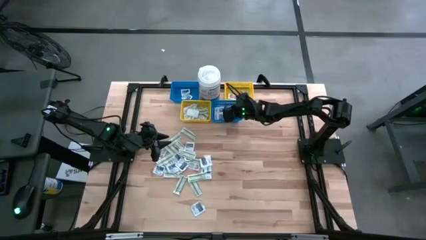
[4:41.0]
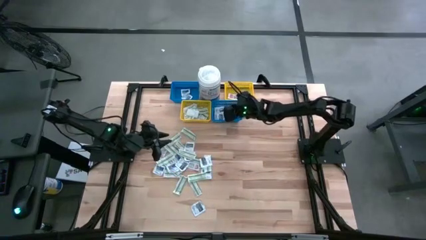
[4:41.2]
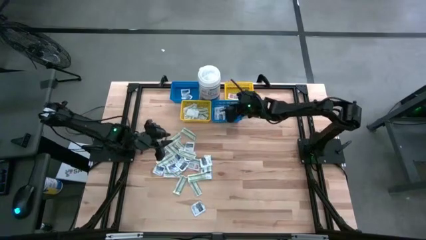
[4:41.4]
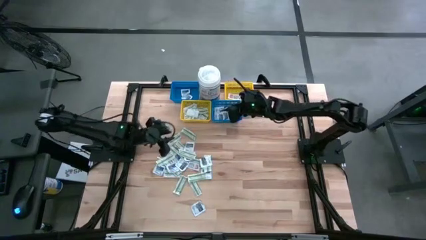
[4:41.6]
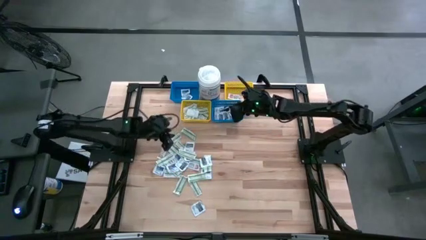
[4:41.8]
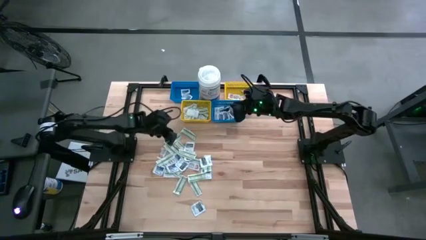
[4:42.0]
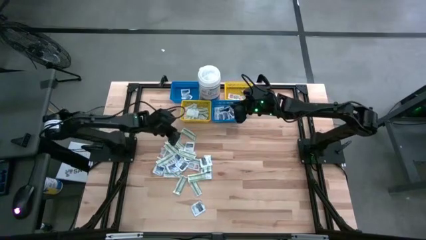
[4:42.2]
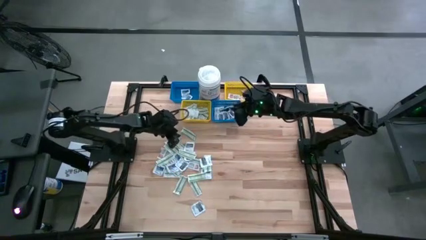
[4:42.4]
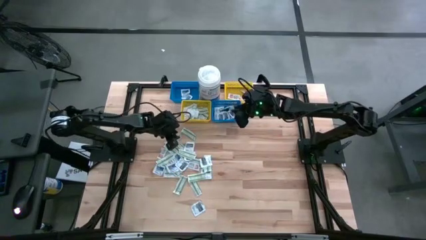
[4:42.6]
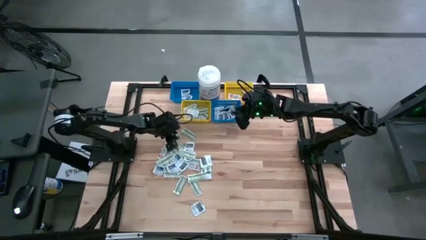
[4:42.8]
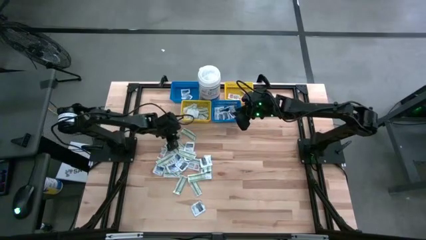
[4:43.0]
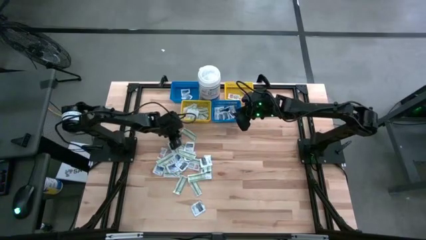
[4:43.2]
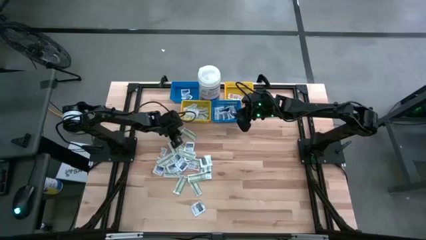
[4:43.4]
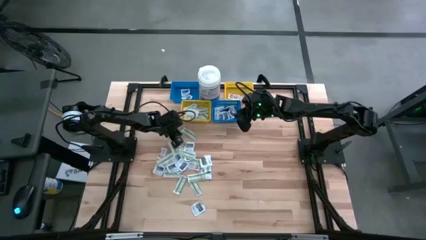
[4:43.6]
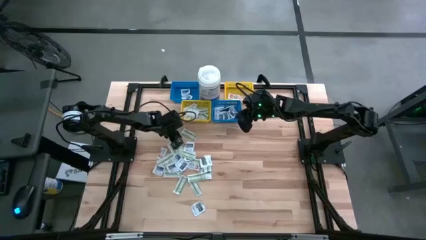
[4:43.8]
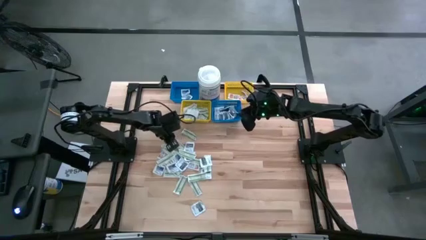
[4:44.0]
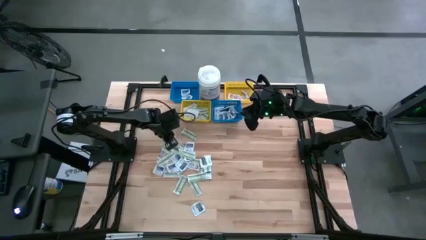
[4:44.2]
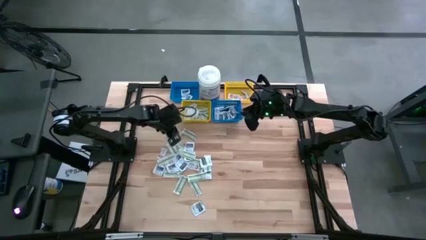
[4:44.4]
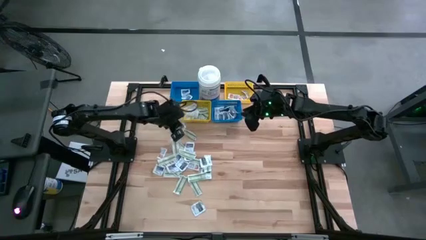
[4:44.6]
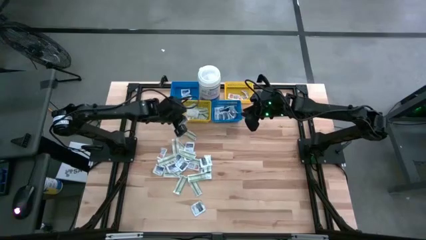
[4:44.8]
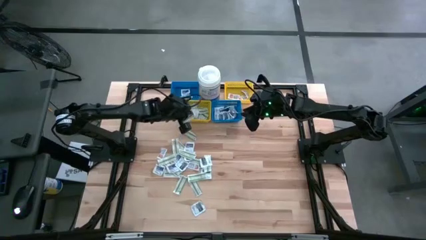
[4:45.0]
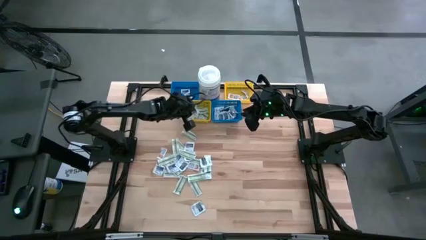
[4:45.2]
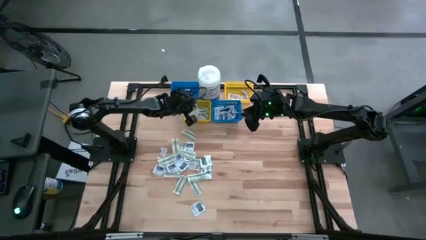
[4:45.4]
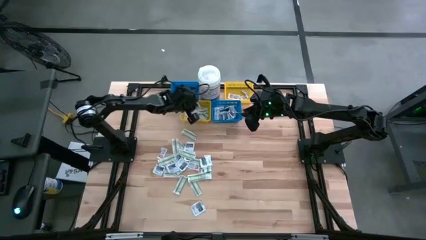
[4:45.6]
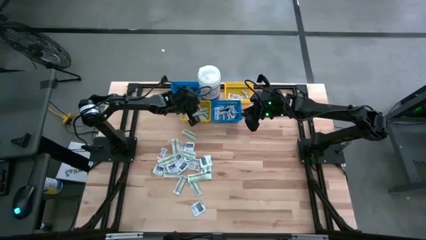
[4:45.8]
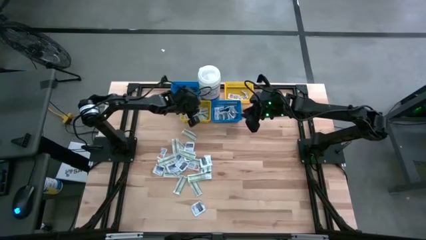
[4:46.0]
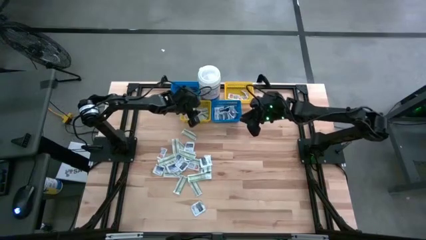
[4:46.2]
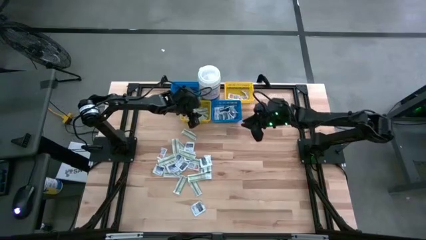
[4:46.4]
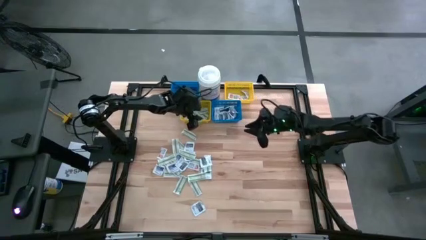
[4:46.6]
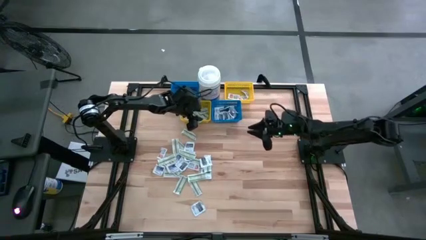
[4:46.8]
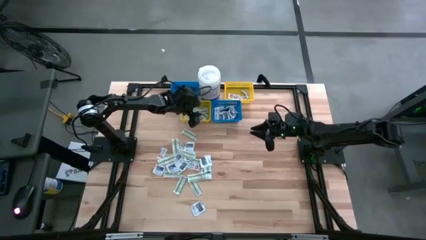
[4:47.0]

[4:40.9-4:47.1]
Task: Pick & Place First Aid Supplies
Put the green bandage pad into the left yellow bin

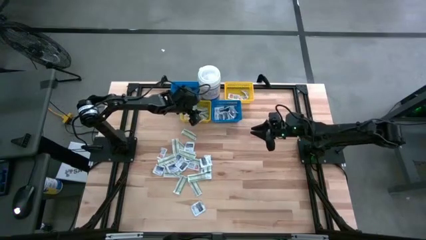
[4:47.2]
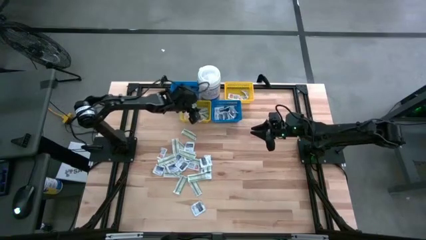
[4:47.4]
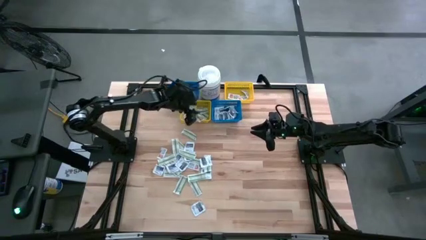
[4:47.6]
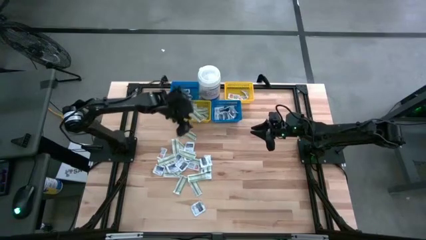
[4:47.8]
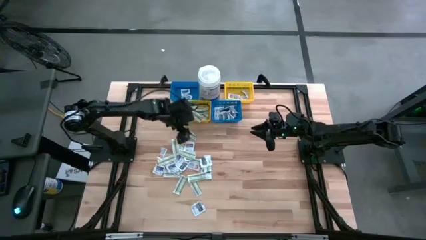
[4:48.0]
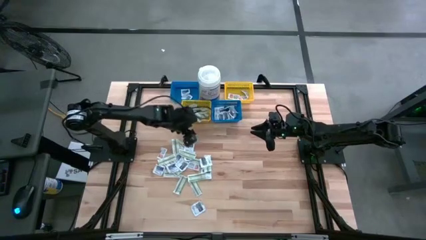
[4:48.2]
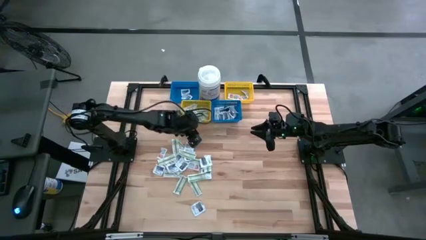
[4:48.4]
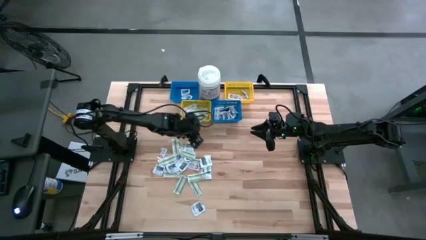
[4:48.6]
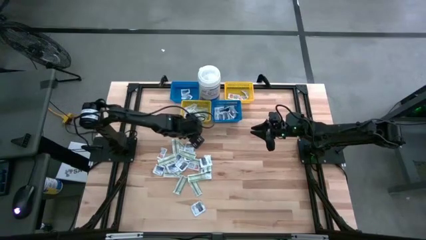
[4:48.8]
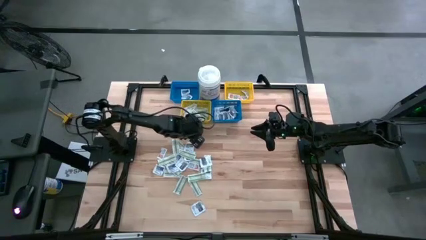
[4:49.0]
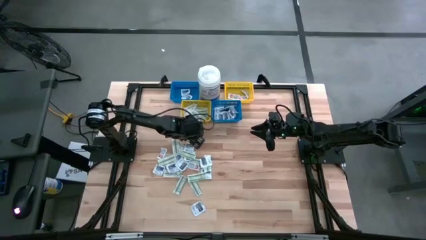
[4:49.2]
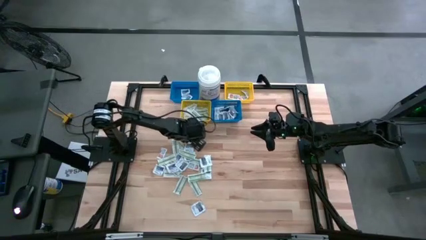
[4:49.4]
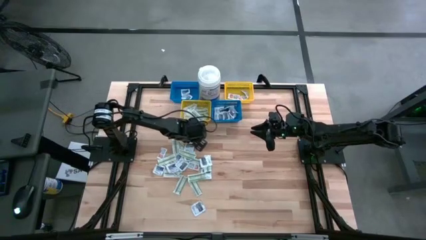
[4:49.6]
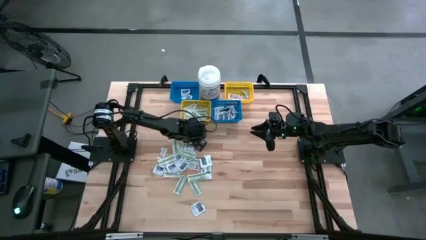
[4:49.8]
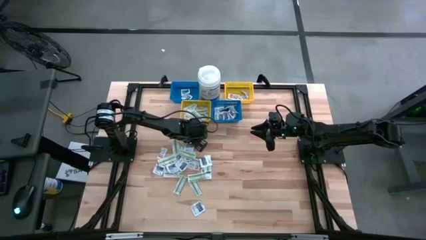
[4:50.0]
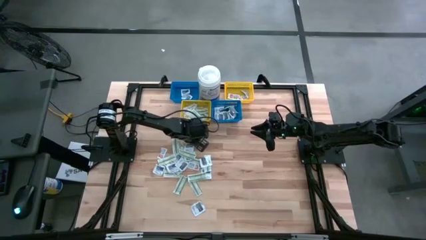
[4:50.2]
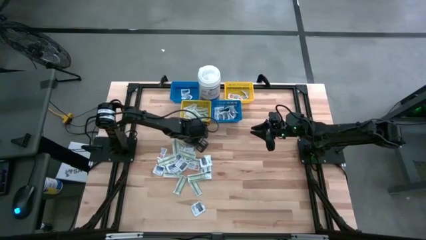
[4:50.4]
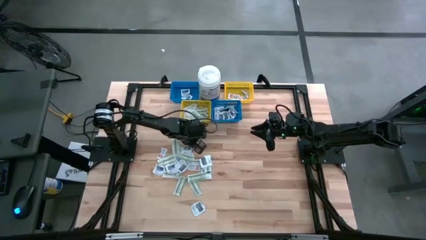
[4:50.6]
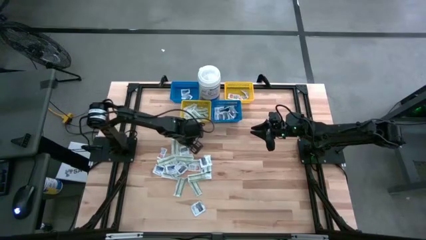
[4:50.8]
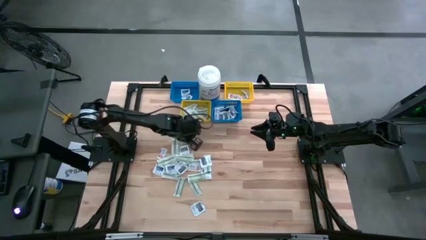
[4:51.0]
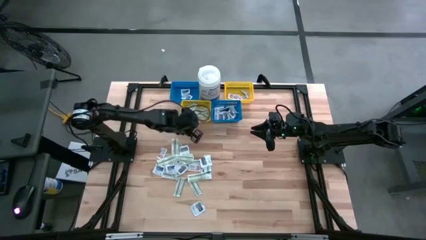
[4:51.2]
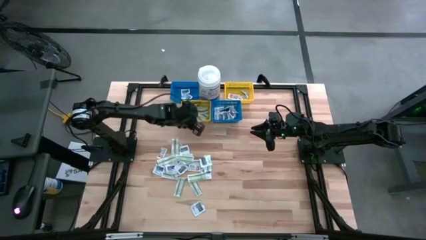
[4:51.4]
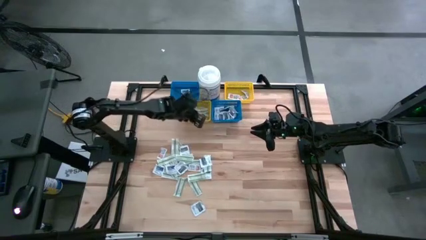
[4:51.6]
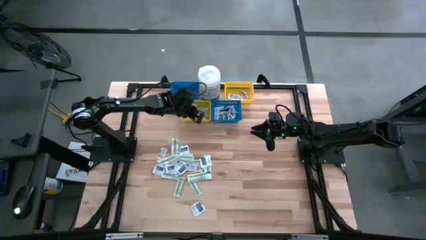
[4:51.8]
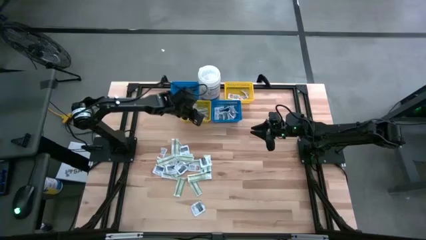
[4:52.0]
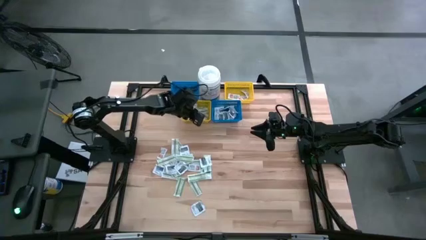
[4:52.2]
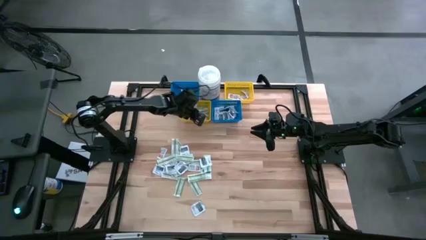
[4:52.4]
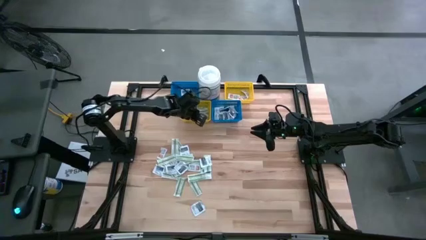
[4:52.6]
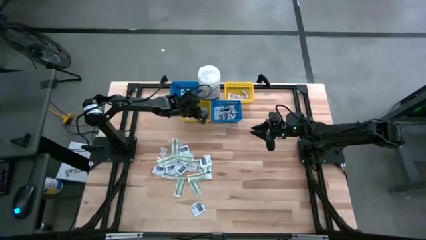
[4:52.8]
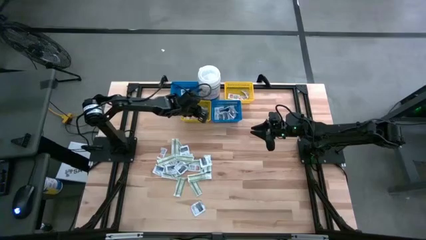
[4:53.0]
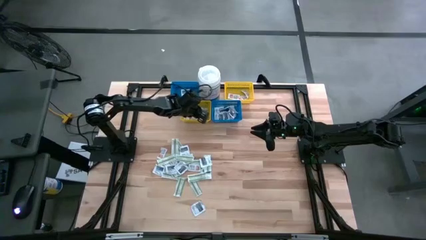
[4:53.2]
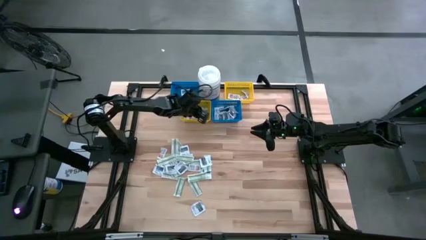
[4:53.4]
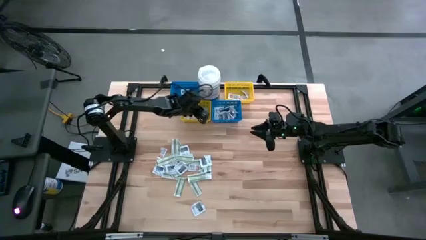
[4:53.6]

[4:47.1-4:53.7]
Put the green bandage pad into the left yellow bin

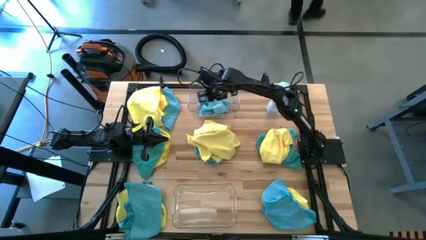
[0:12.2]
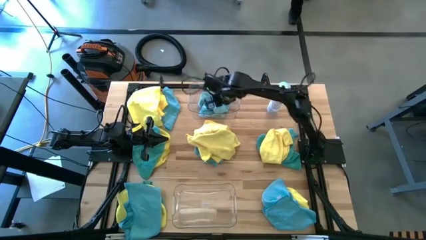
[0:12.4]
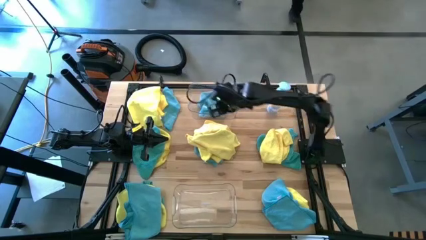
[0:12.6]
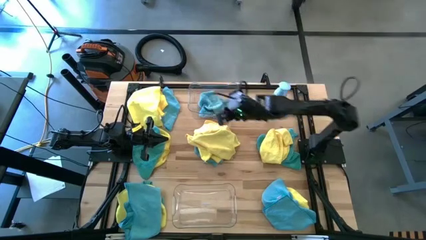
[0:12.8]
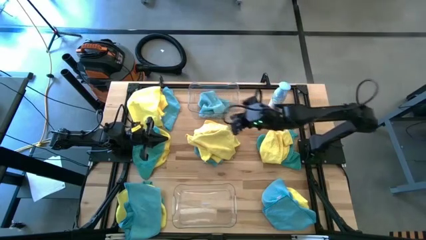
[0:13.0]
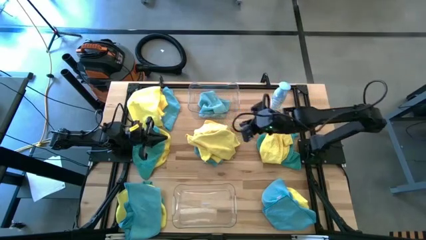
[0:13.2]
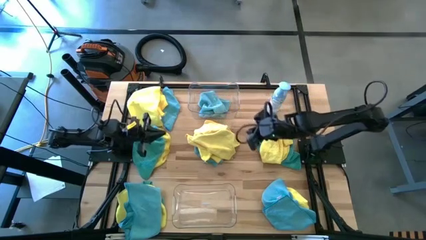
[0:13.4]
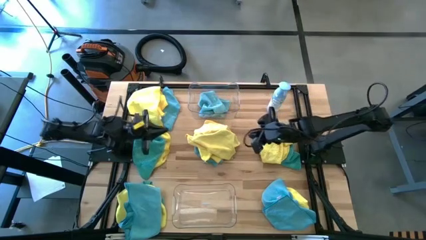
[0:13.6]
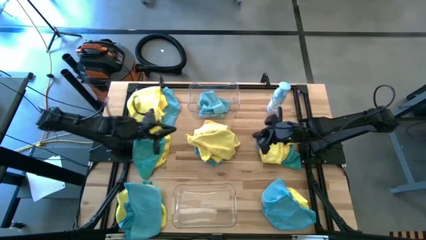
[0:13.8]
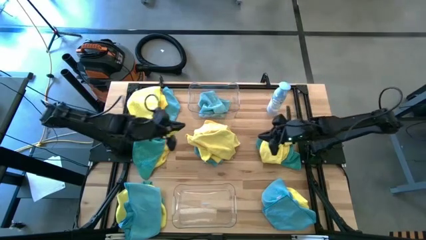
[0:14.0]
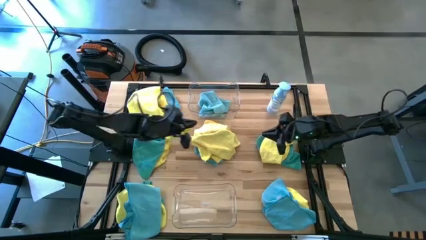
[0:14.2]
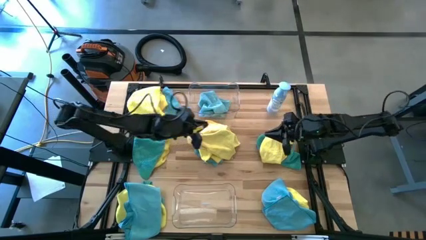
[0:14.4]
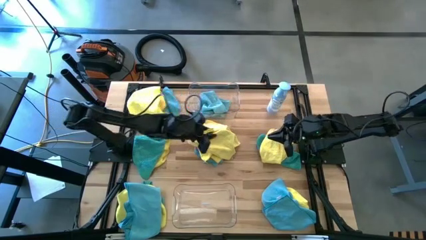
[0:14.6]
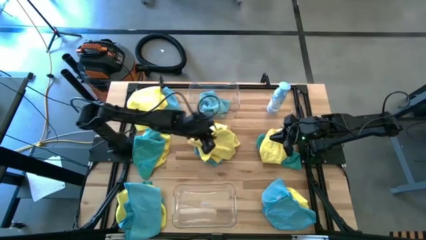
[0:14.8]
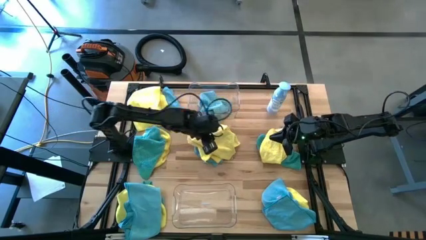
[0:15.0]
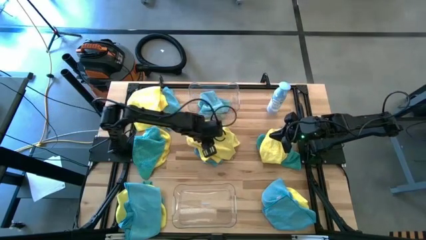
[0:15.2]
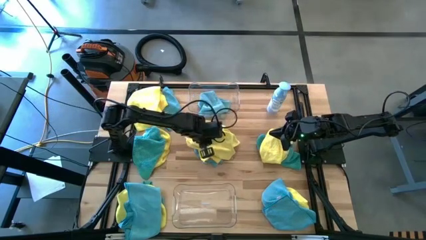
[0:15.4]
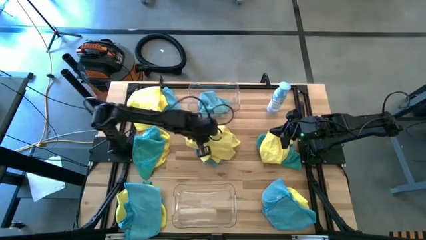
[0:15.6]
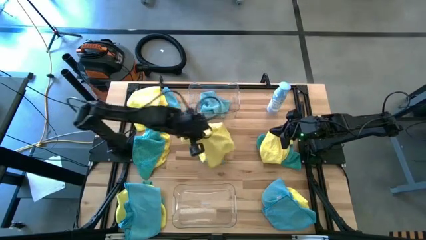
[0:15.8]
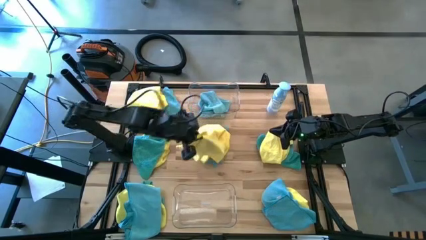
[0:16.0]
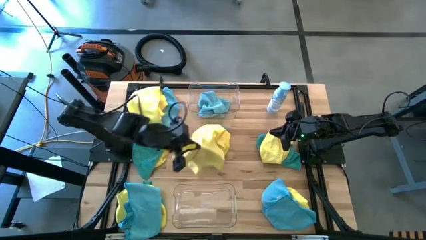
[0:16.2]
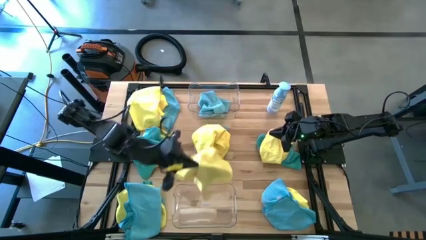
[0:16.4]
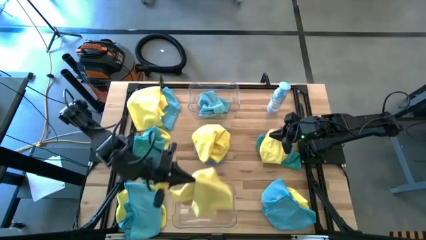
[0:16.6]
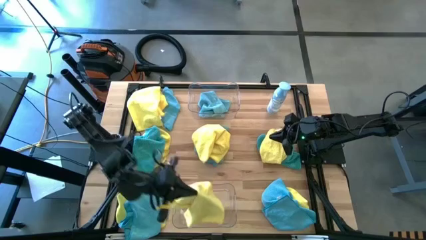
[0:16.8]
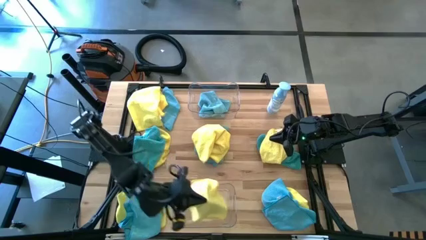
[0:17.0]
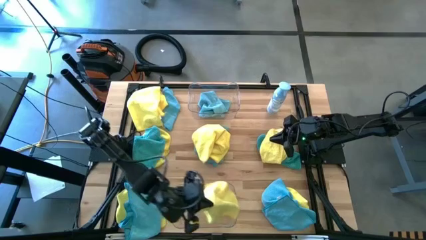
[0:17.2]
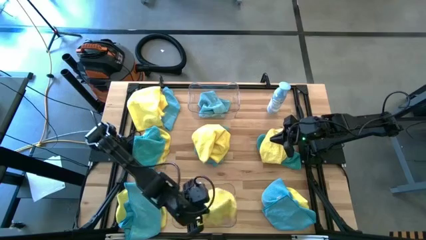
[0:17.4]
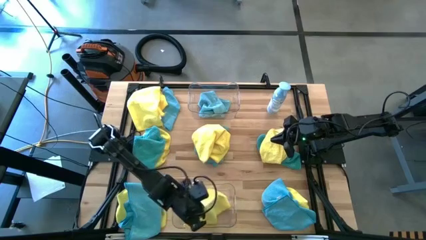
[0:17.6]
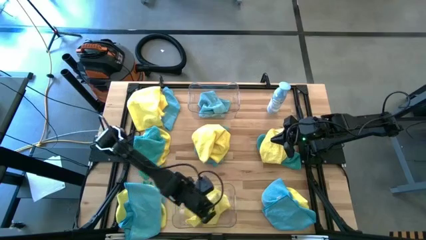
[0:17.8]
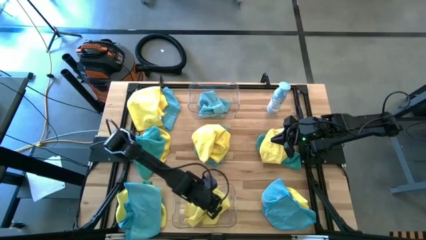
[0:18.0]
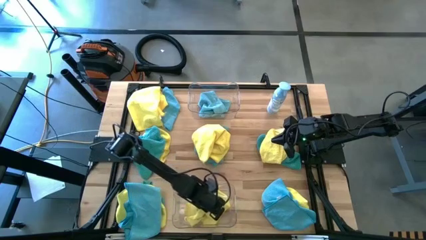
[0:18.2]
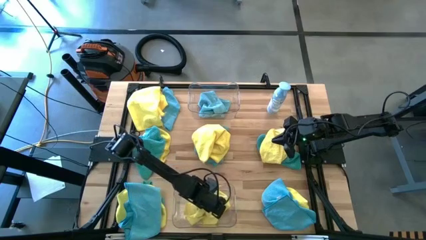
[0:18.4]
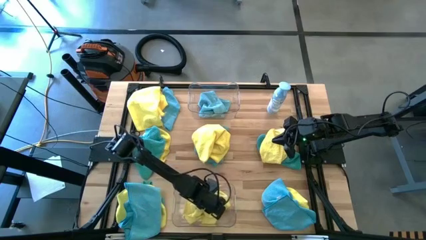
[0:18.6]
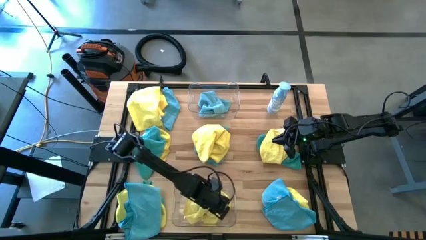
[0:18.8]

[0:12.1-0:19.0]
Task: Sort microfiber towel by color & place in baskets
Put the yellow microfiber towel into the bottom transparent bin
